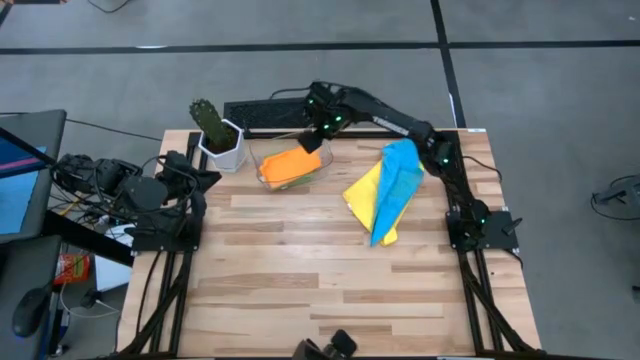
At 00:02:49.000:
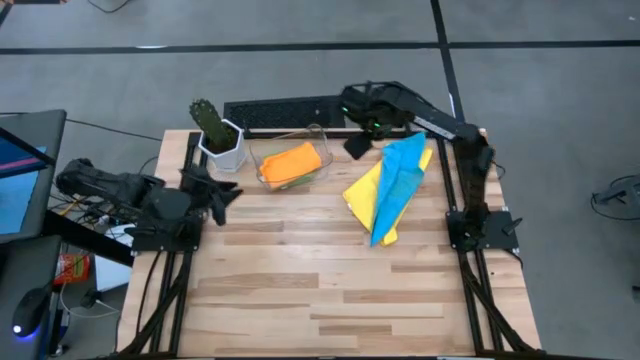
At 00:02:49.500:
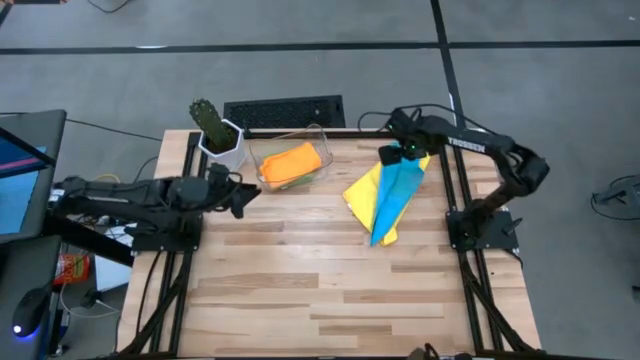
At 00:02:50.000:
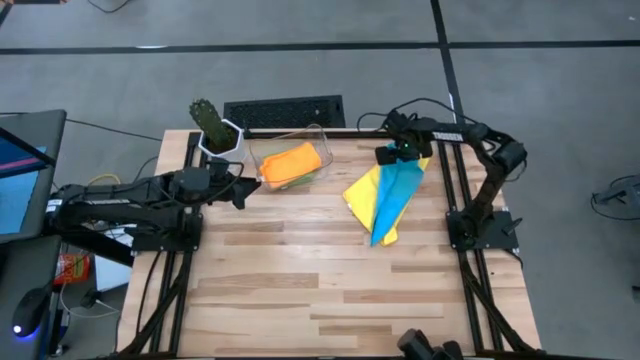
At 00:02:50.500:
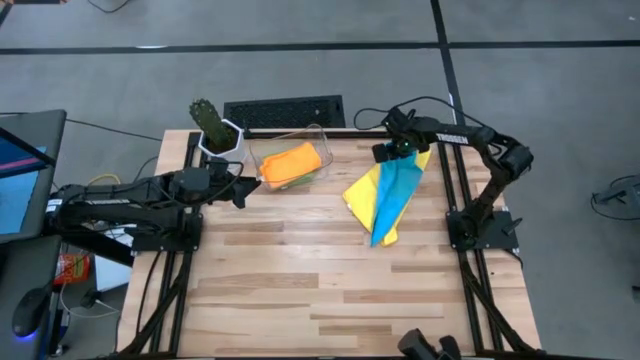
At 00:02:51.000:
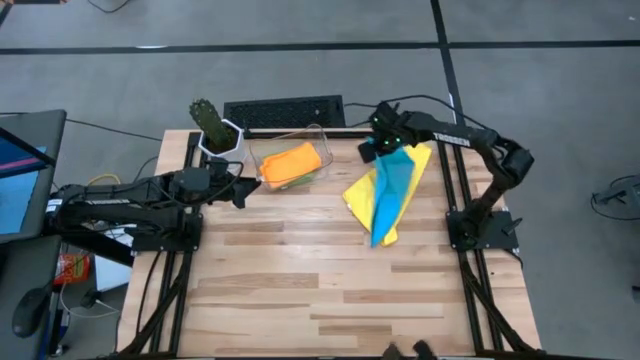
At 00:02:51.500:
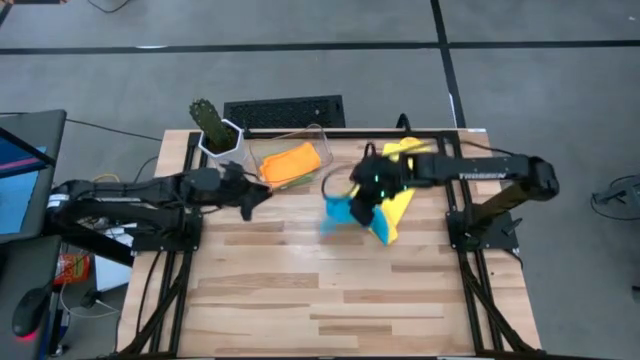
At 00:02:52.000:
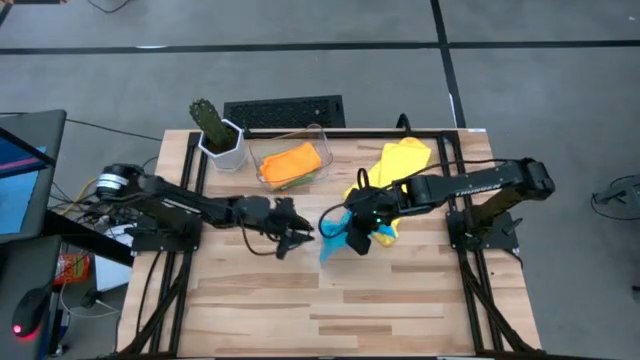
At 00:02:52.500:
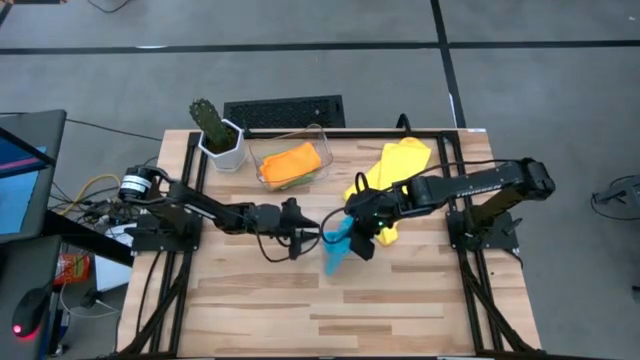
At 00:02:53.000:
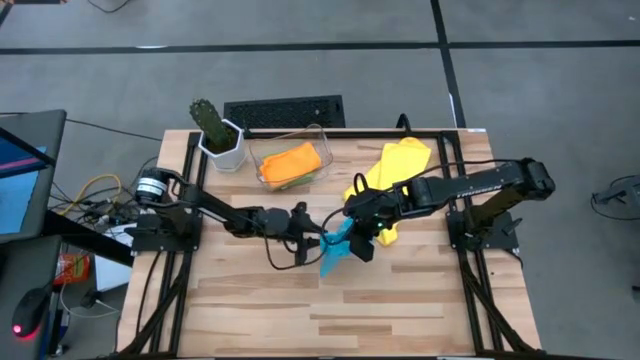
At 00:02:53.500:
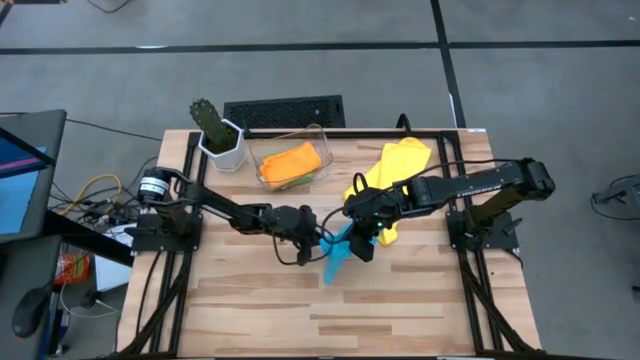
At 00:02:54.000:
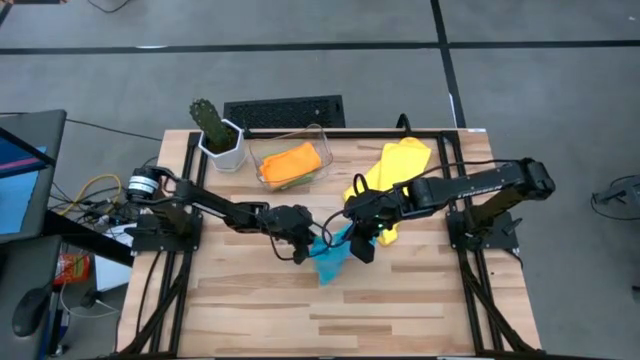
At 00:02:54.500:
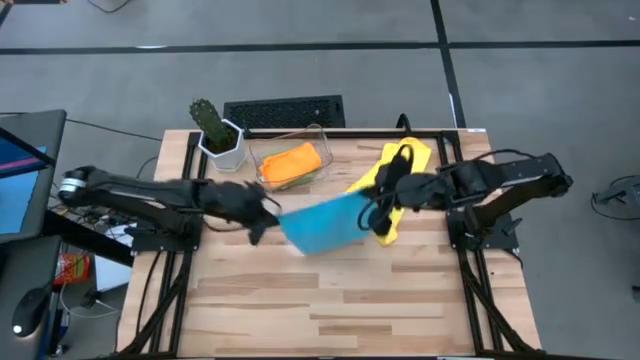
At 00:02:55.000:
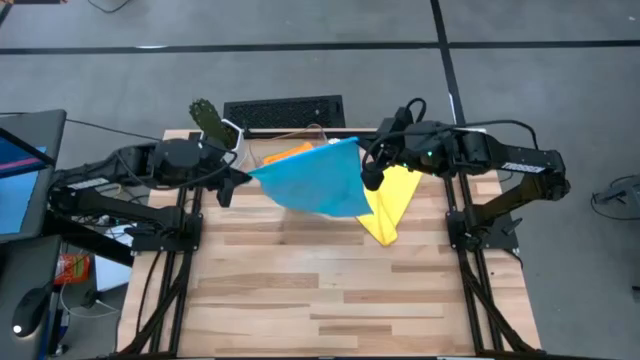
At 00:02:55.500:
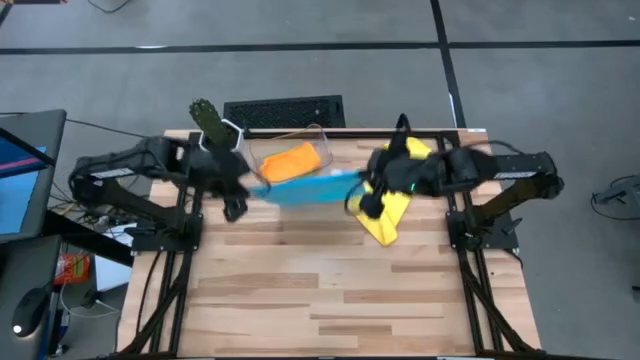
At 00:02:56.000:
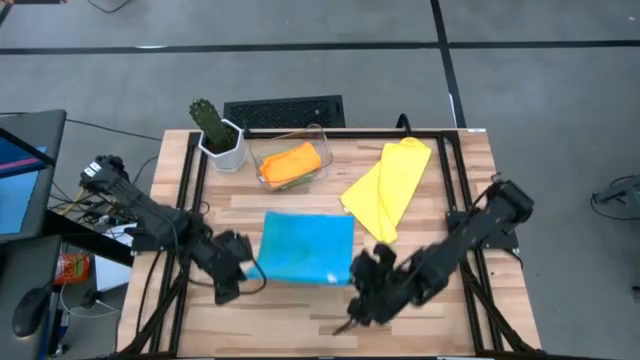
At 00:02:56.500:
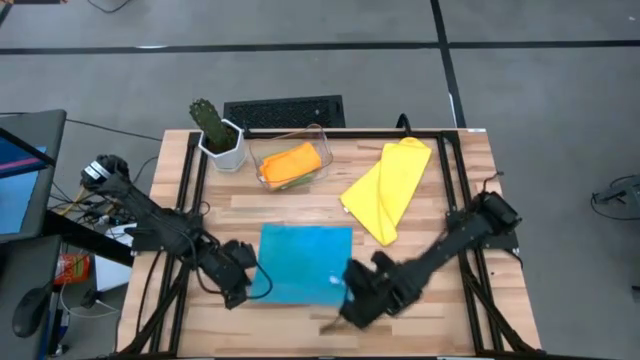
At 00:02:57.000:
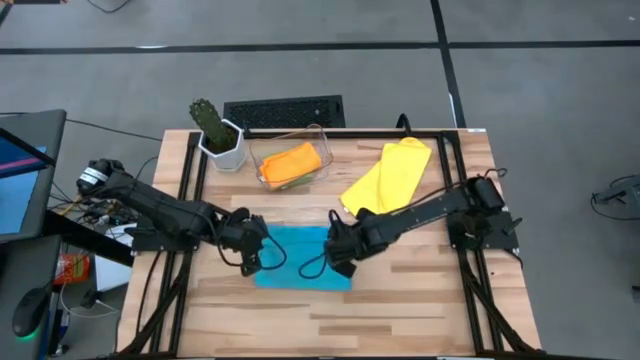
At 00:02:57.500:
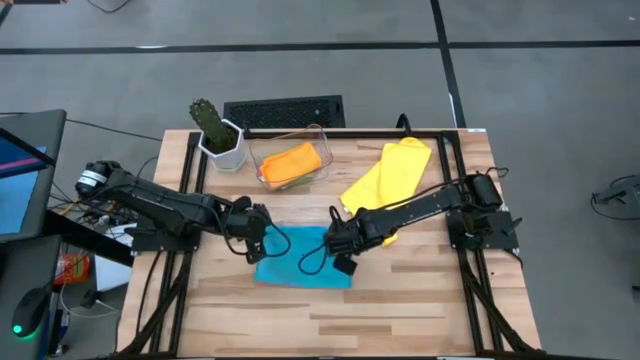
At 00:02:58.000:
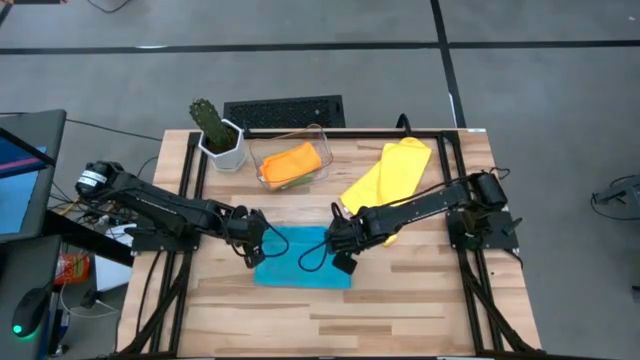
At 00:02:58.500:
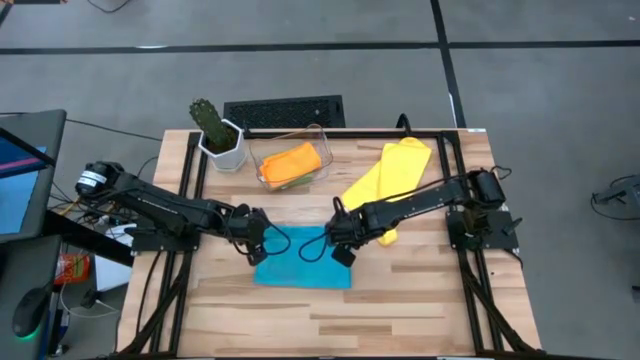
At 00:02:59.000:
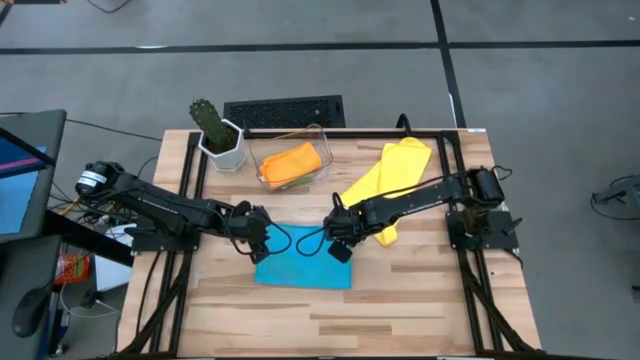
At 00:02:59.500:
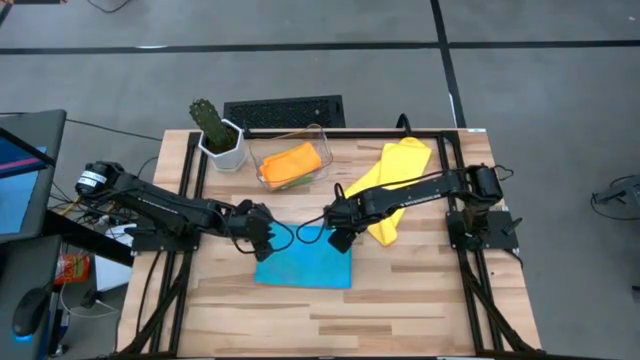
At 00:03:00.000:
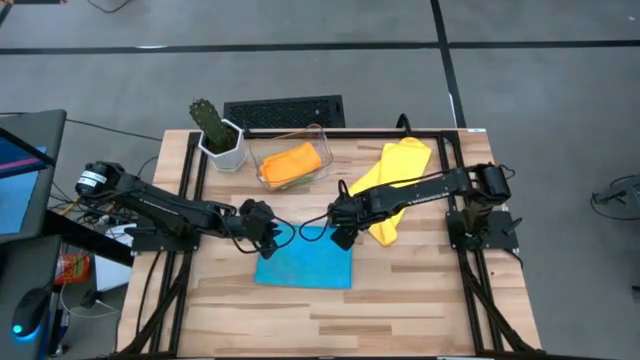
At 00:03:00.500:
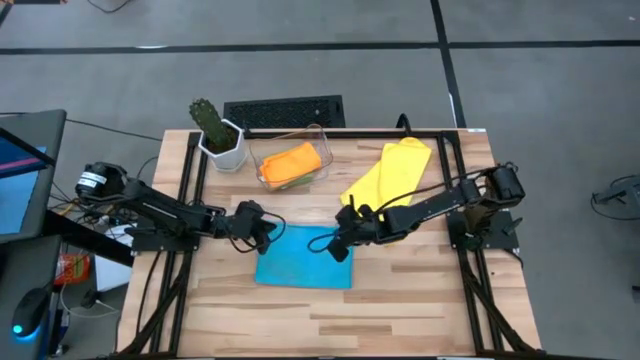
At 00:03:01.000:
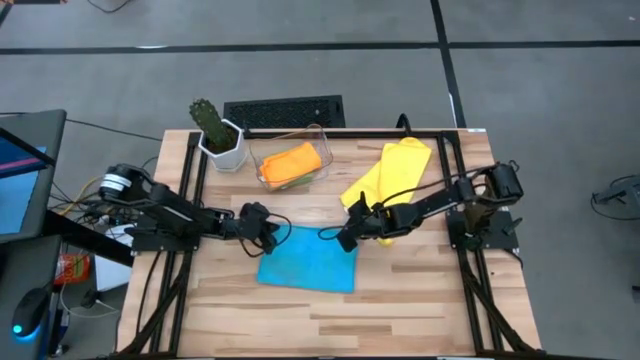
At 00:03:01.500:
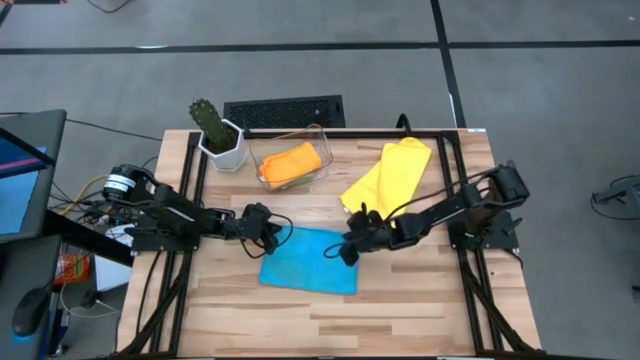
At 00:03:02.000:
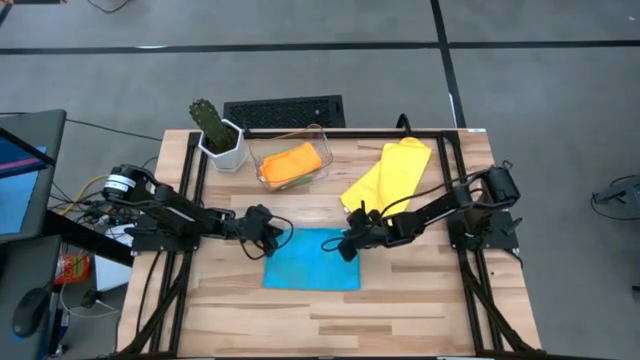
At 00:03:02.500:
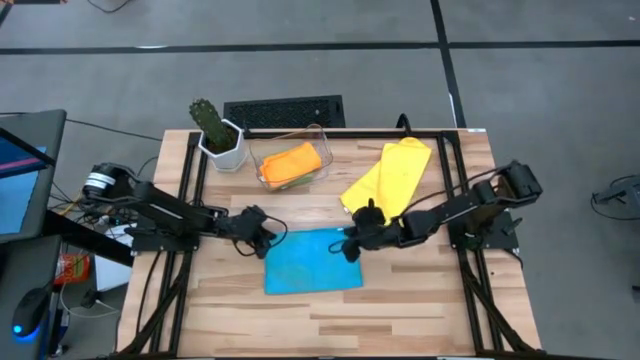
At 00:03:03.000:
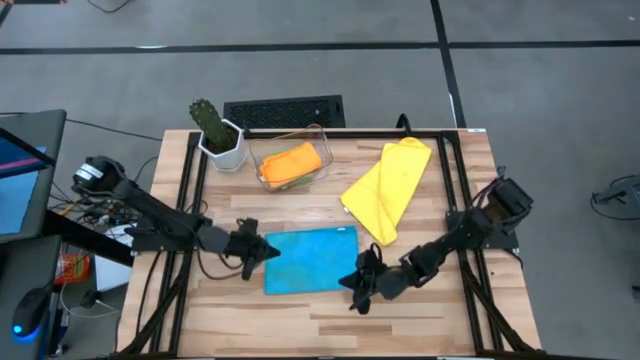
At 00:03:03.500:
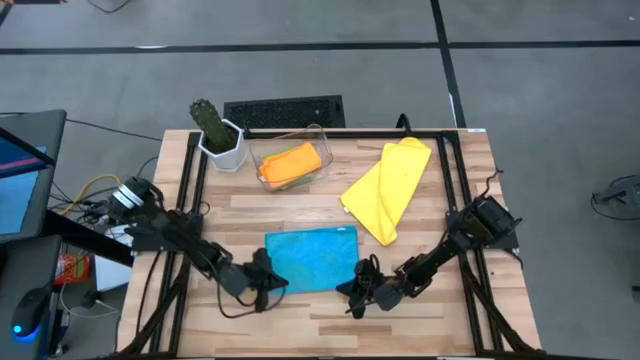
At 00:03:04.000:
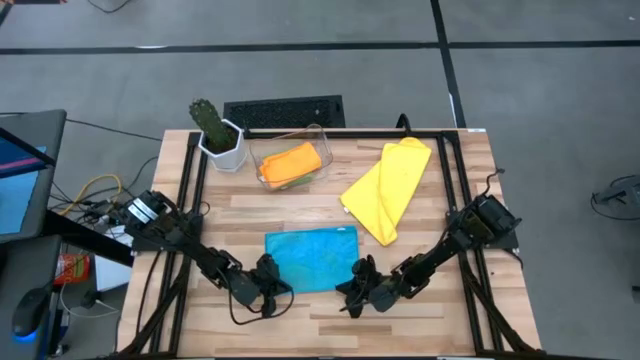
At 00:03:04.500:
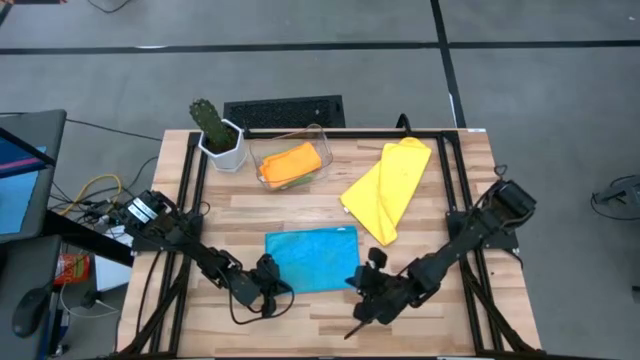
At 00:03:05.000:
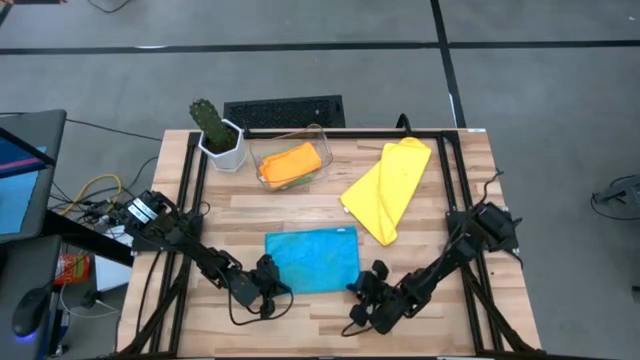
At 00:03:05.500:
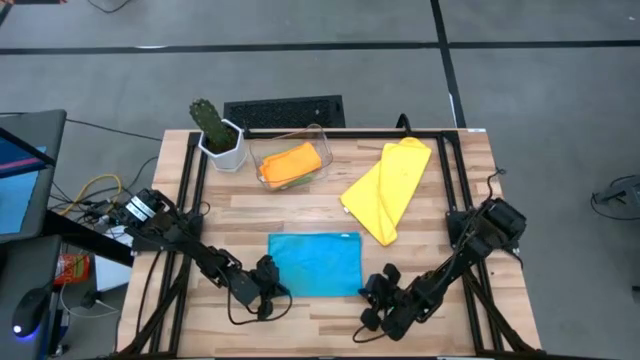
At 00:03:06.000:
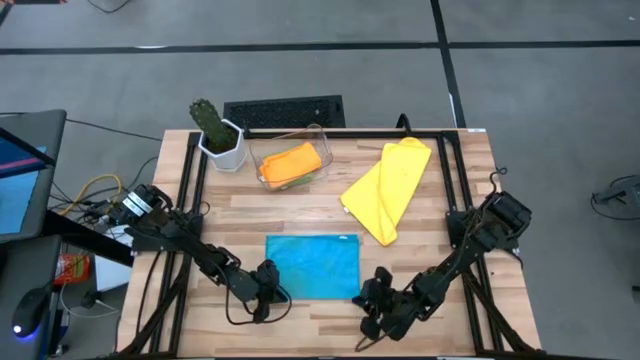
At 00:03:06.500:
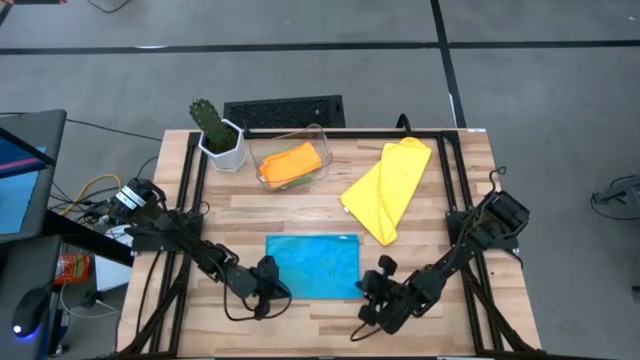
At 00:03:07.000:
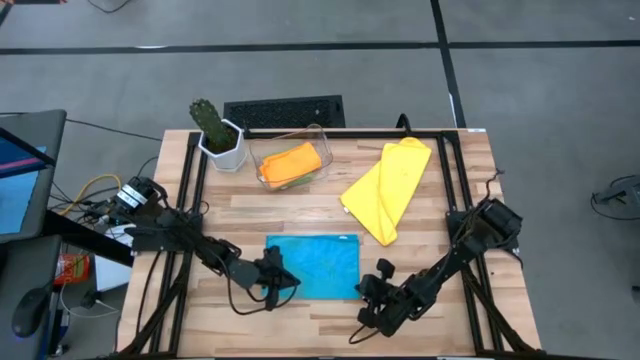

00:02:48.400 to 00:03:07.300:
Task: Fold microfiber towels
Fold the blue microfiber cloth

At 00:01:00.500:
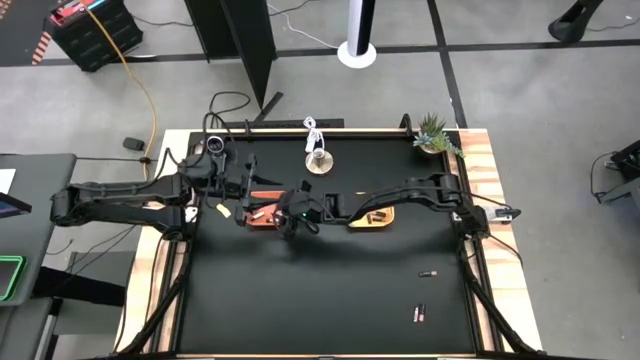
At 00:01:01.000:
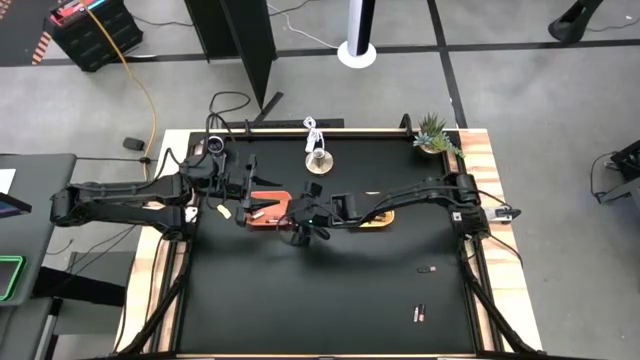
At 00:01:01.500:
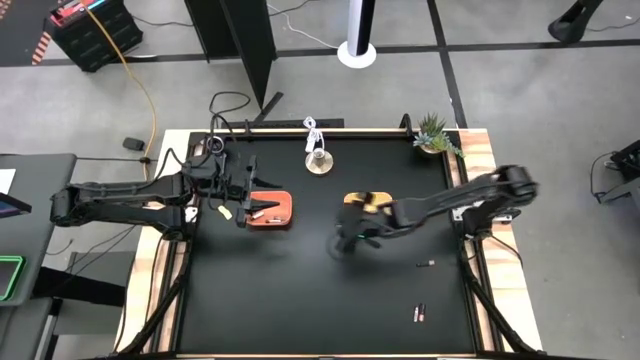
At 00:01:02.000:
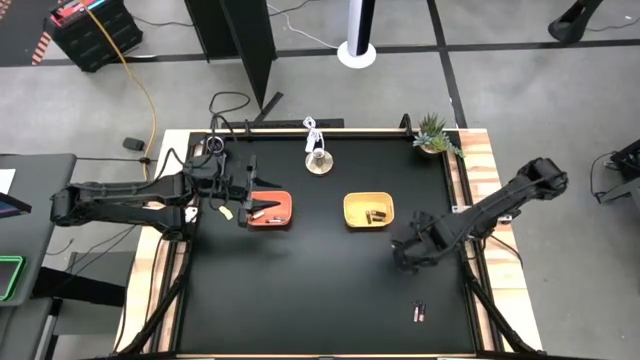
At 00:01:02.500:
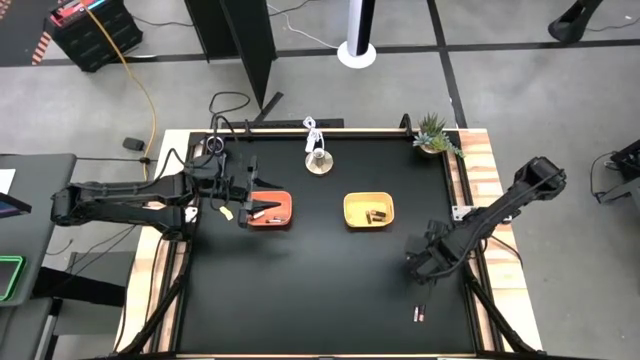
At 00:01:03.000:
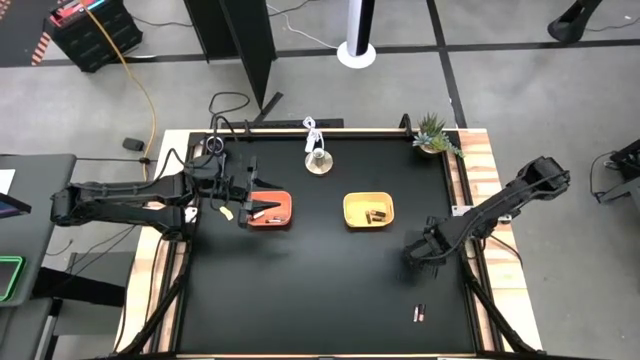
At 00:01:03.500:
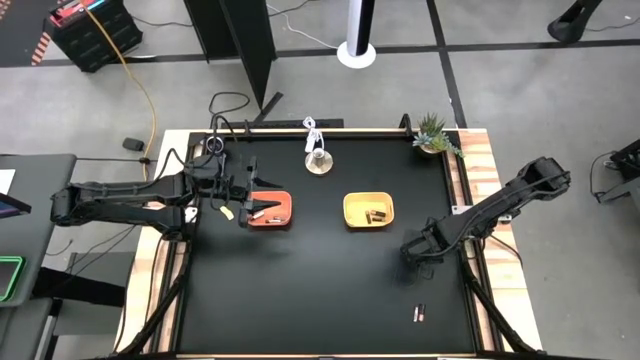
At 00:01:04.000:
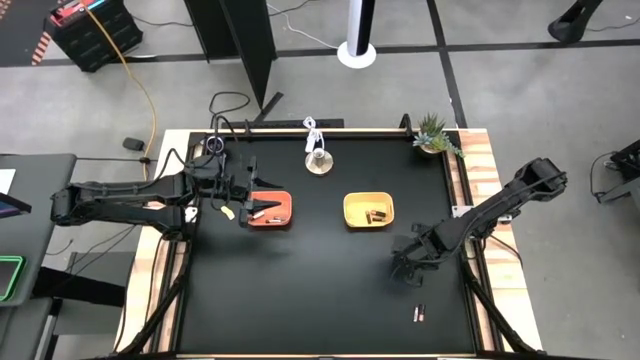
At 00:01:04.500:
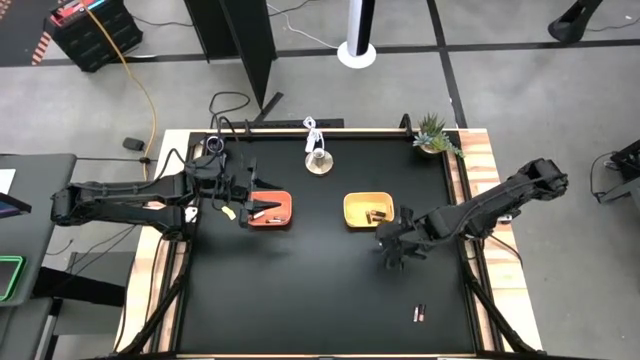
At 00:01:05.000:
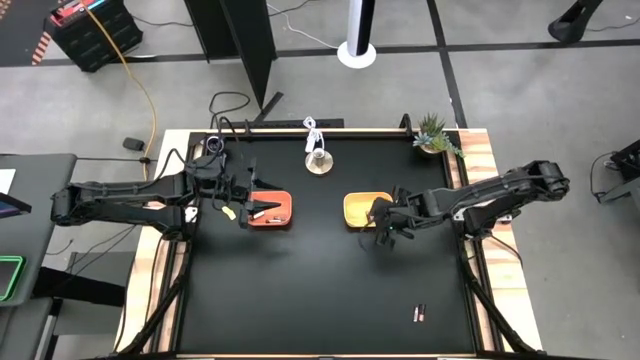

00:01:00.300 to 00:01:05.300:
Task: Sort batteries
Put the black battery into the yellow bin
